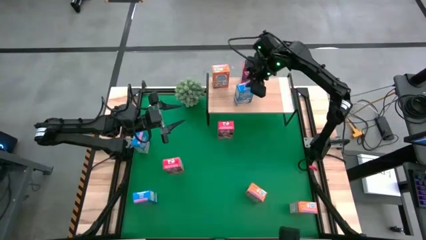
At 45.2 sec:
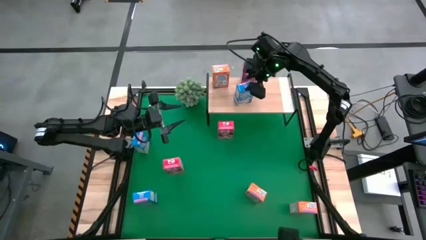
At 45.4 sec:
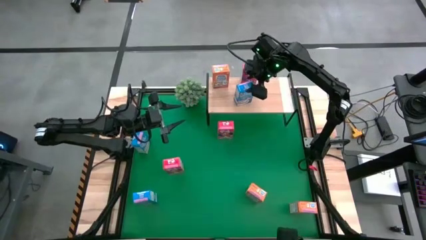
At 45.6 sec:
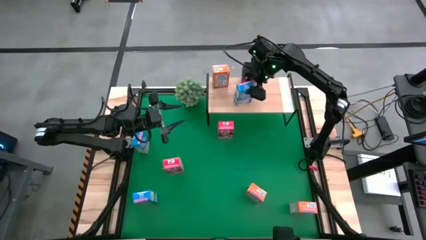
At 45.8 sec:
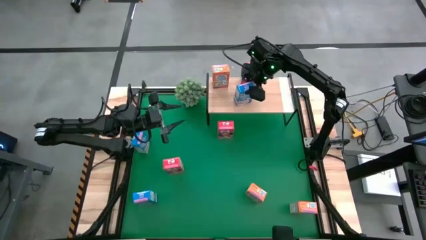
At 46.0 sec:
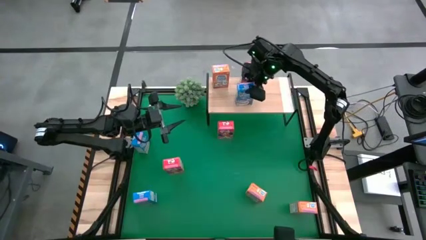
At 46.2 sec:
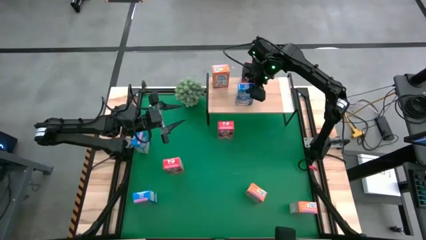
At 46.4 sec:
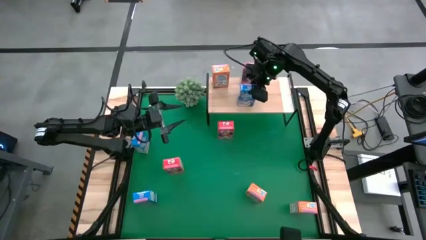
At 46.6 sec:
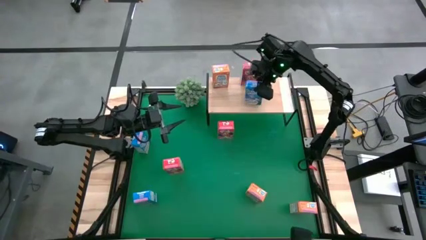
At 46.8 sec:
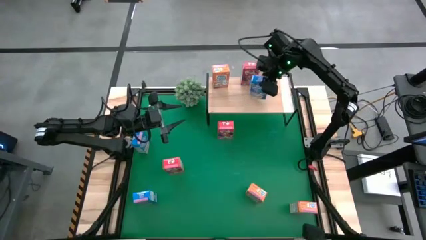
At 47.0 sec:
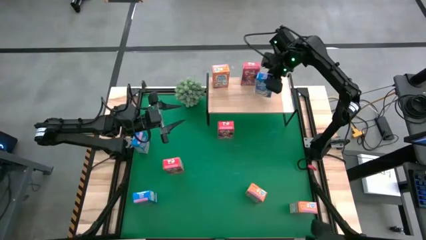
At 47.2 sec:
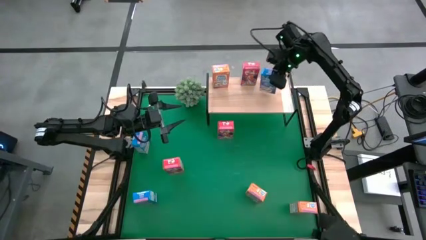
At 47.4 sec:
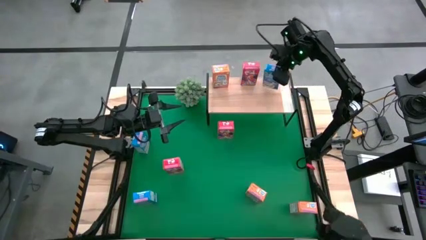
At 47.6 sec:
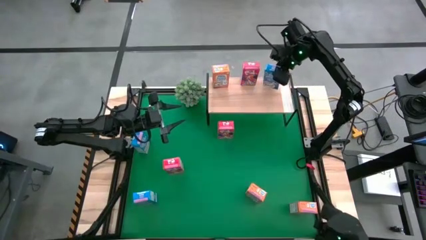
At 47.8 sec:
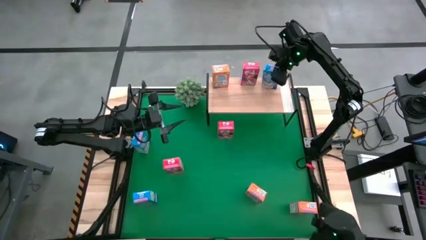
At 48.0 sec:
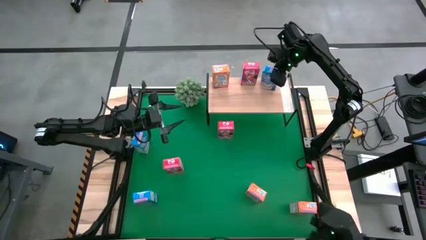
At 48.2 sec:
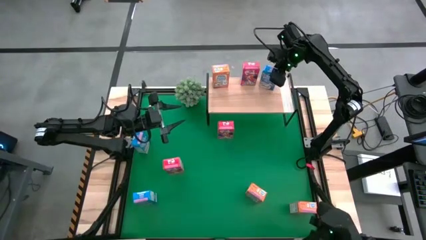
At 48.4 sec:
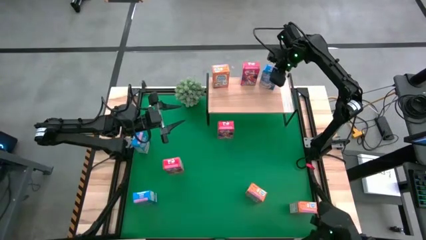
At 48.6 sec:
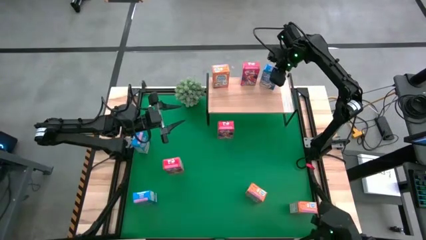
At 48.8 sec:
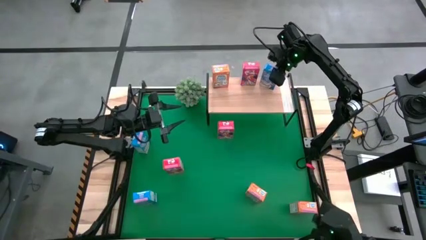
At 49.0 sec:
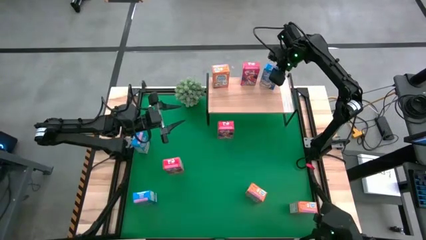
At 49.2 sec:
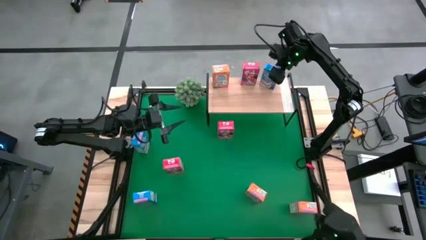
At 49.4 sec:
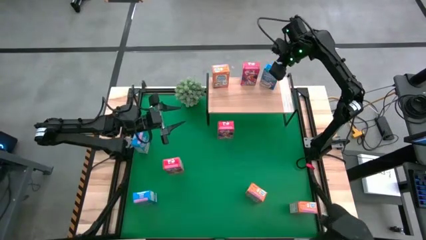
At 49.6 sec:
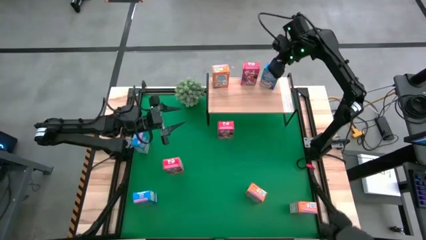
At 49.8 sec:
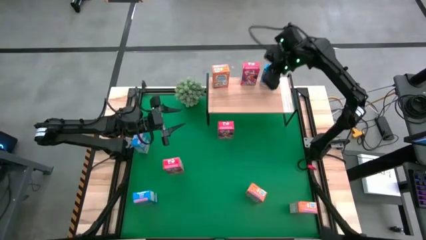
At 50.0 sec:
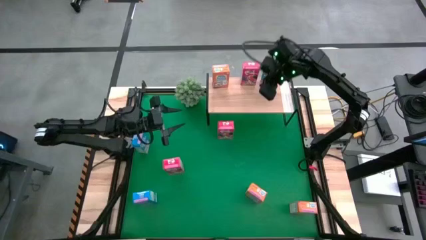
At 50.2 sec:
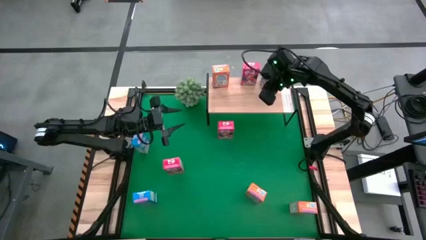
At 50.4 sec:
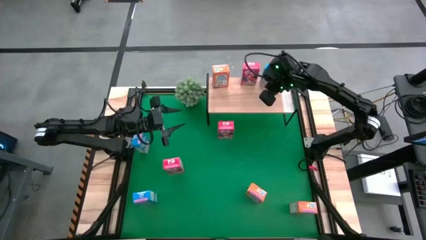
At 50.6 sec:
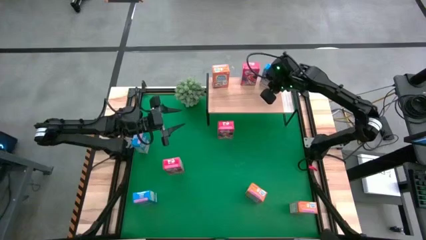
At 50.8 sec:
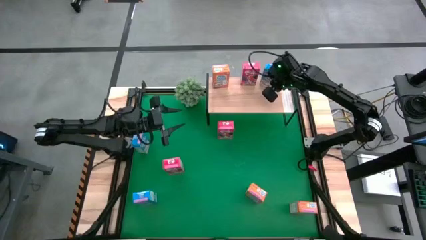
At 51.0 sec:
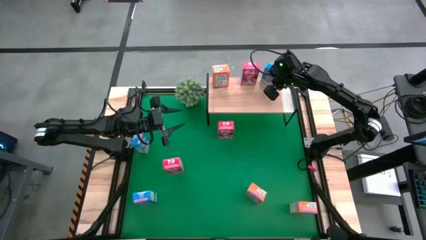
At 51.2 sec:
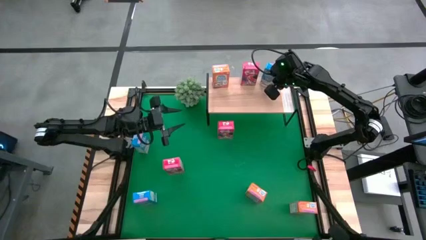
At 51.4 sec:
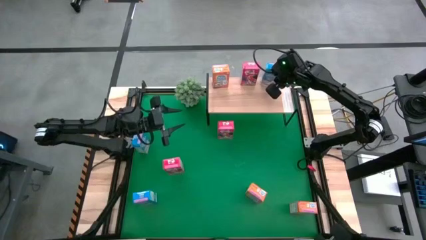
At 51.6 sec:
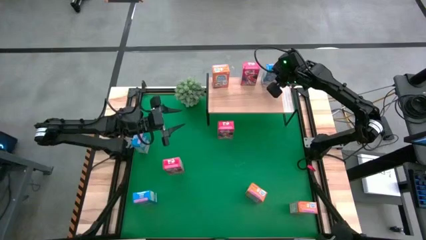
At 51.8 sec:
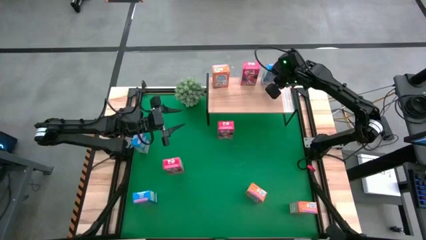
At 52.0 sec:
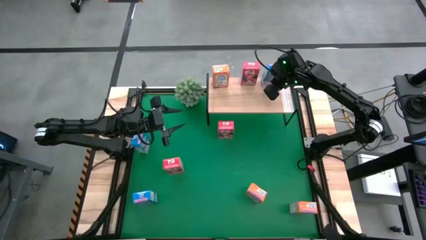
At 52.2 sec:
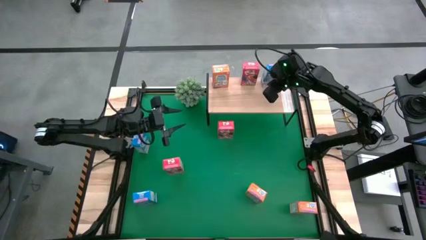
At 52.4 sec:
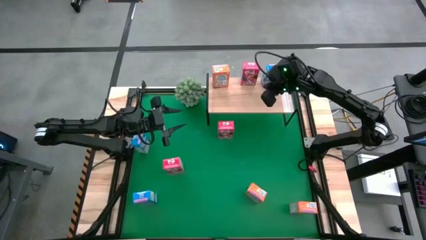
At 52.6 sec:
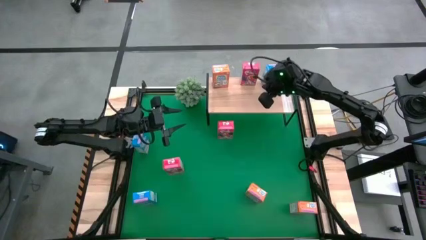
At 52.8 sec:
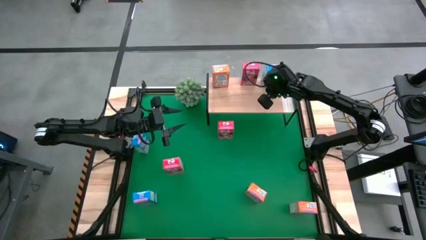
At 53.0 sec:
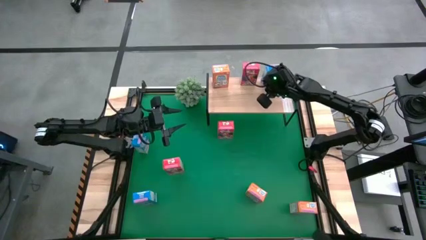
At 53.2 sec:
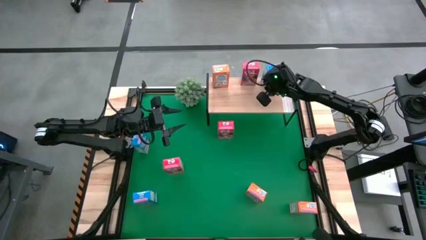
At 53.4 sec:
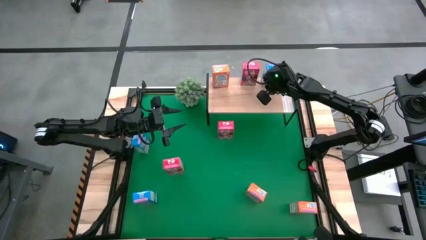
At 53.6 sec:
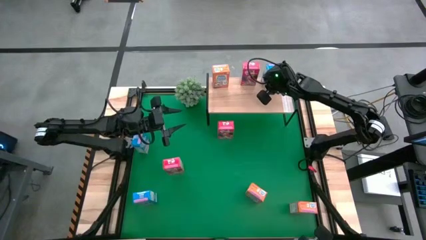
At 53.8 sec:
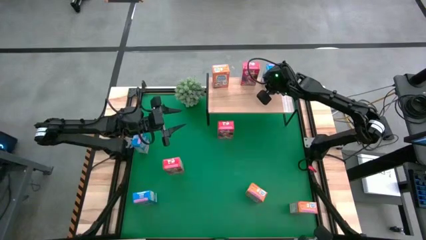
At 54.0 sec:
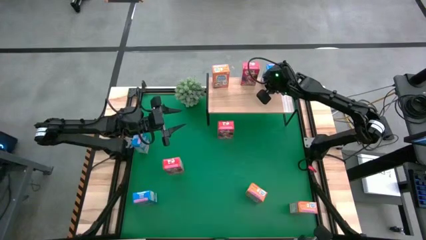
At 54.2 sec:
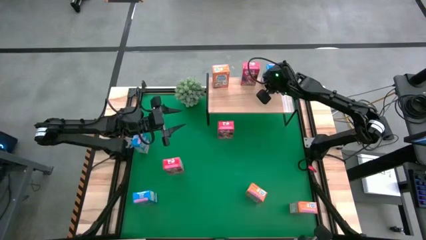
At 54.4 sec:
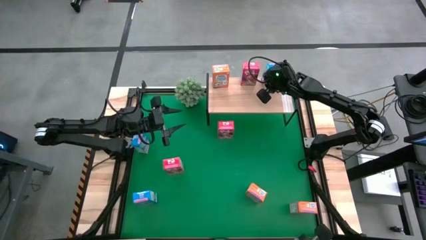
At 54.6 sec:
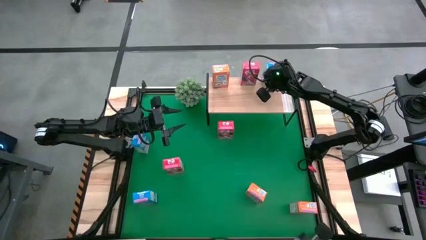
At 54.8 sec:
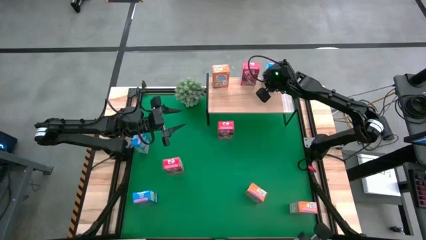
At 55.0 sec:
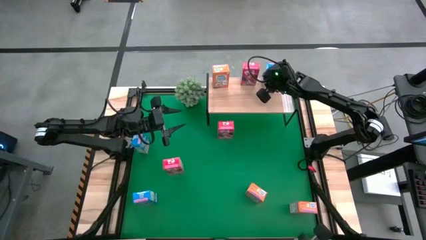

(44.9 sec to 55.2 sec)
Task: Stack cereal on shelf
Put the right blue cereal box on the shelf
